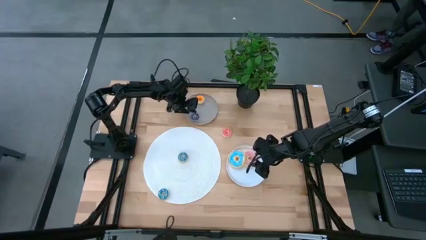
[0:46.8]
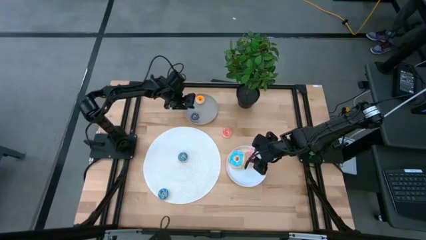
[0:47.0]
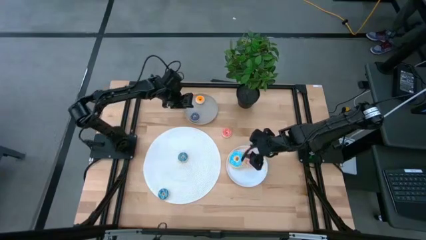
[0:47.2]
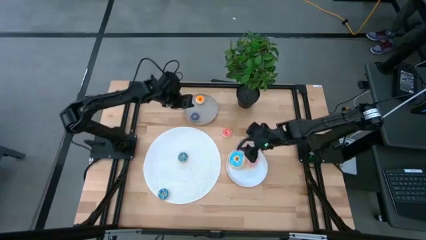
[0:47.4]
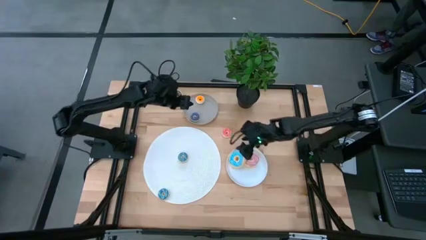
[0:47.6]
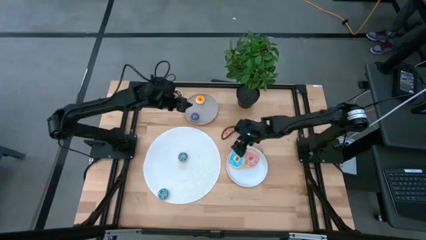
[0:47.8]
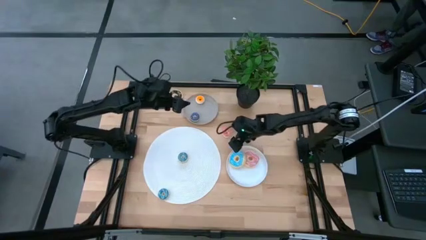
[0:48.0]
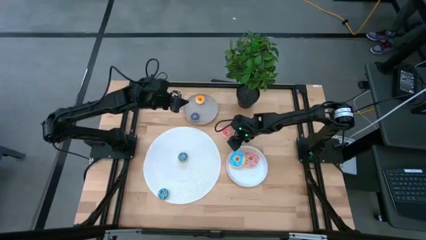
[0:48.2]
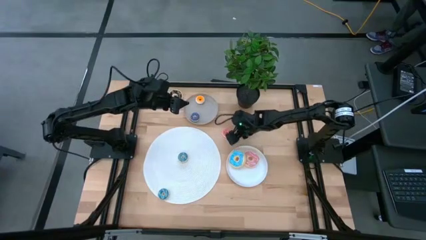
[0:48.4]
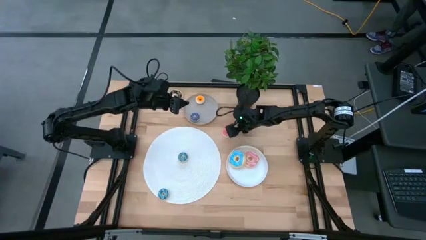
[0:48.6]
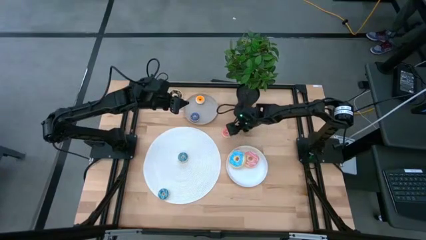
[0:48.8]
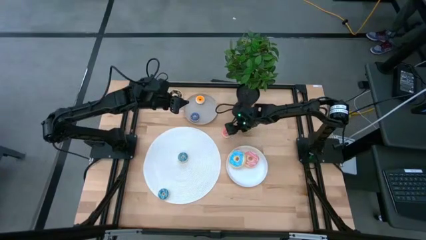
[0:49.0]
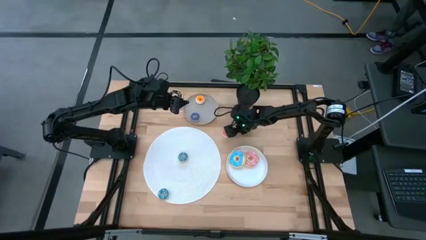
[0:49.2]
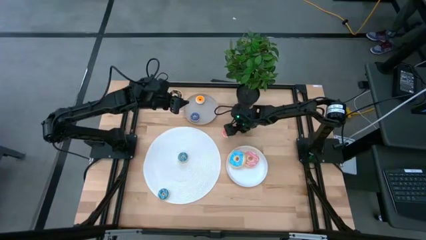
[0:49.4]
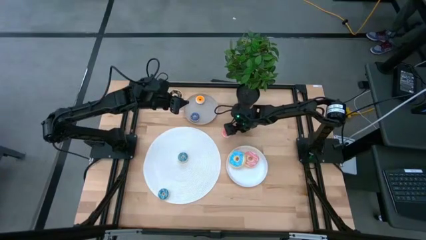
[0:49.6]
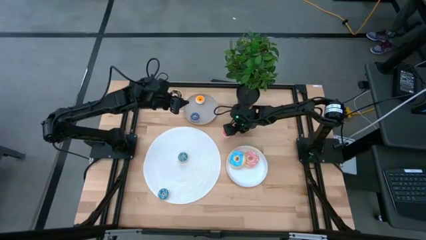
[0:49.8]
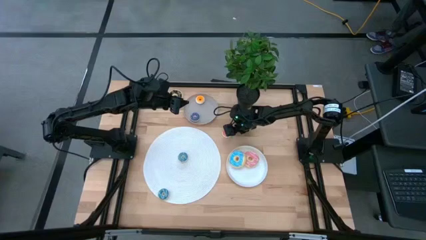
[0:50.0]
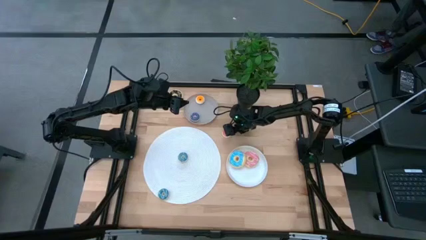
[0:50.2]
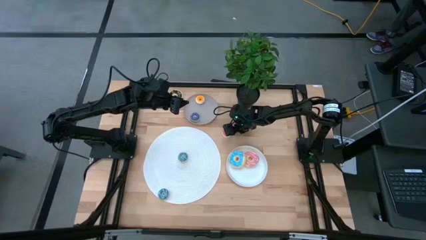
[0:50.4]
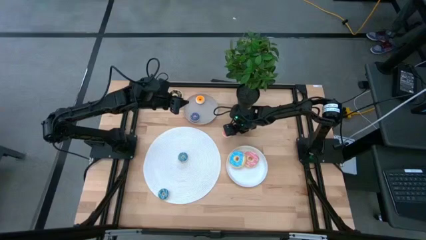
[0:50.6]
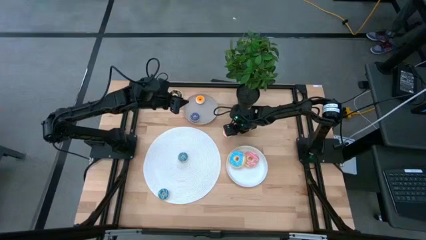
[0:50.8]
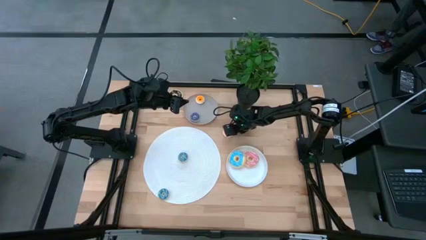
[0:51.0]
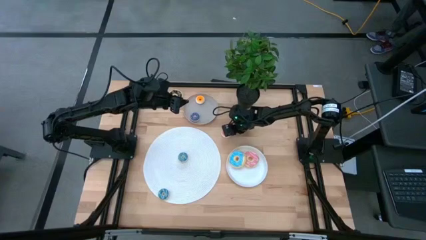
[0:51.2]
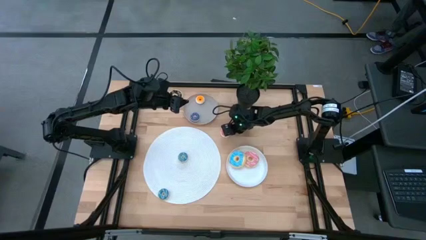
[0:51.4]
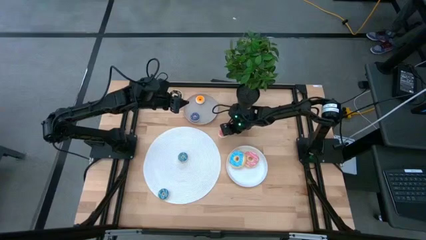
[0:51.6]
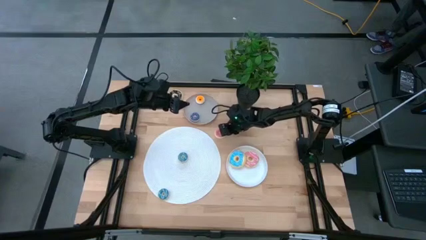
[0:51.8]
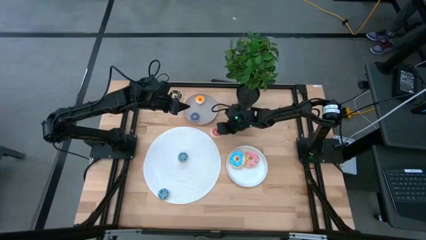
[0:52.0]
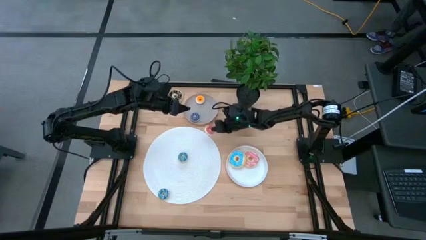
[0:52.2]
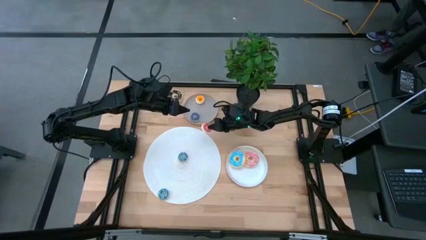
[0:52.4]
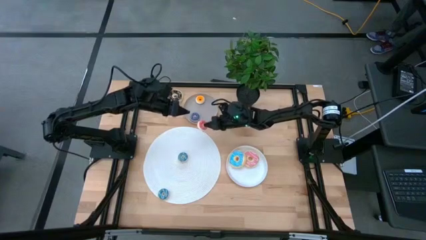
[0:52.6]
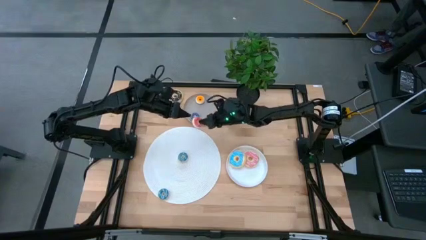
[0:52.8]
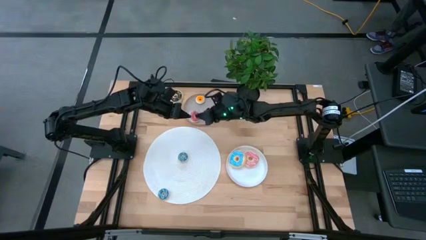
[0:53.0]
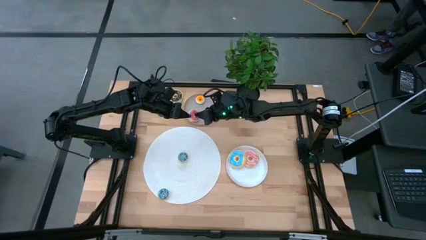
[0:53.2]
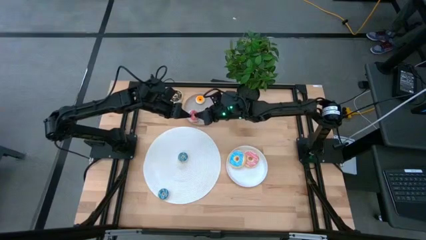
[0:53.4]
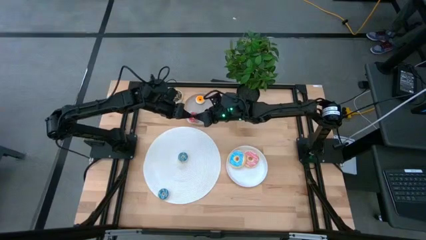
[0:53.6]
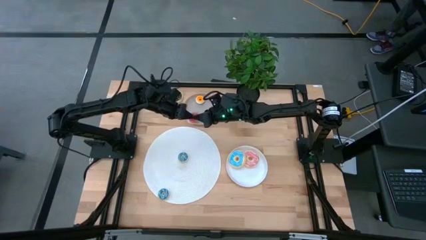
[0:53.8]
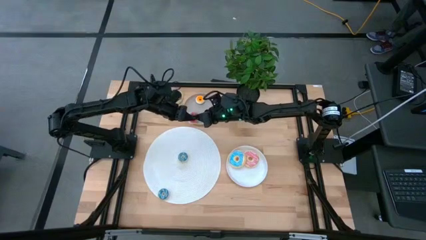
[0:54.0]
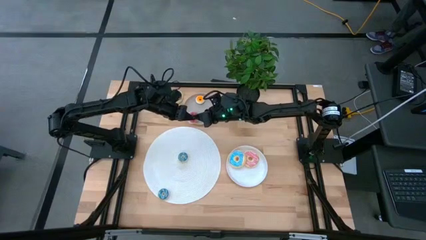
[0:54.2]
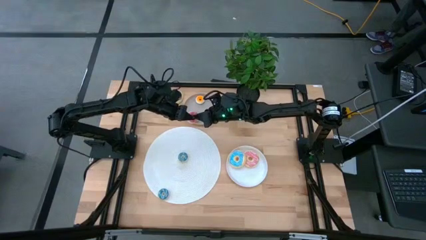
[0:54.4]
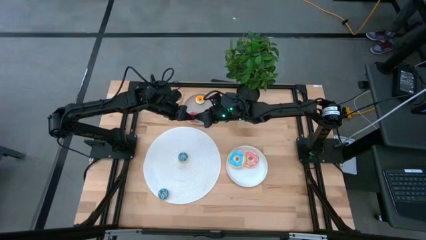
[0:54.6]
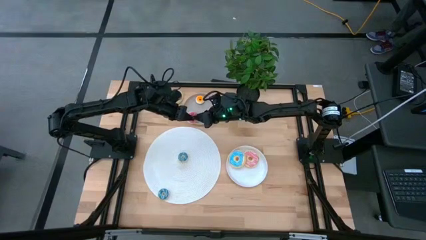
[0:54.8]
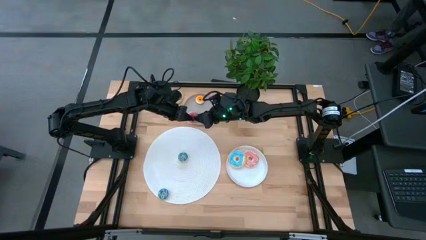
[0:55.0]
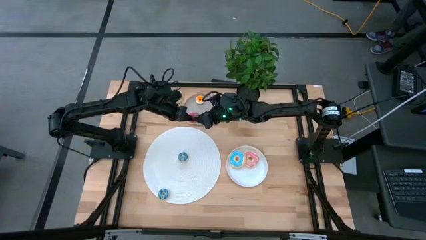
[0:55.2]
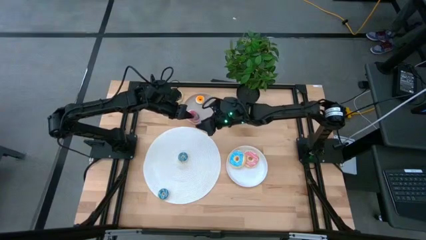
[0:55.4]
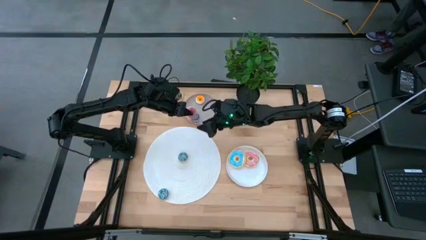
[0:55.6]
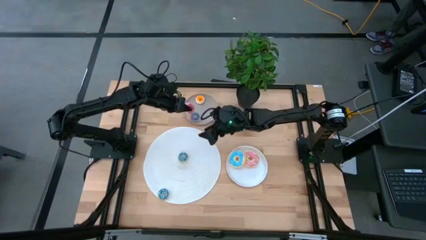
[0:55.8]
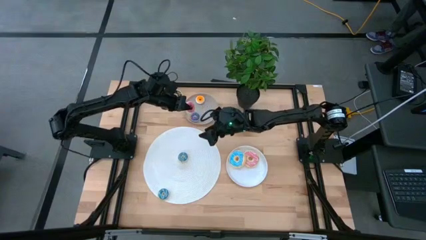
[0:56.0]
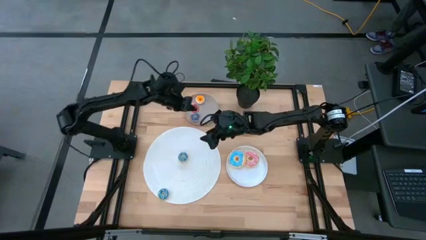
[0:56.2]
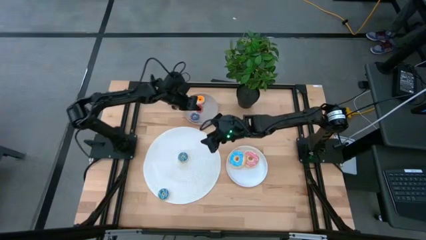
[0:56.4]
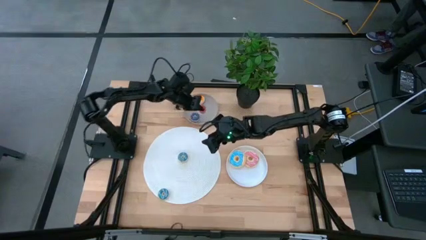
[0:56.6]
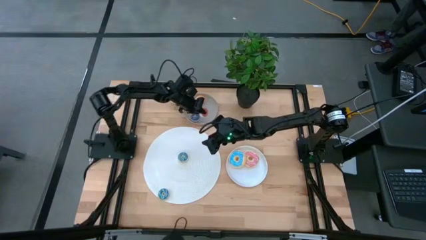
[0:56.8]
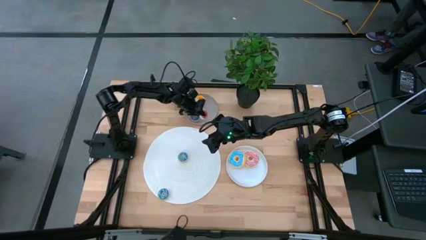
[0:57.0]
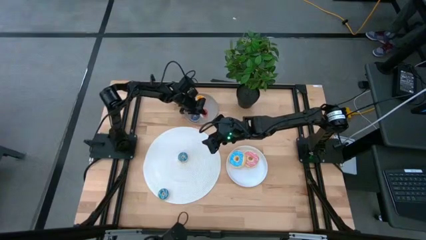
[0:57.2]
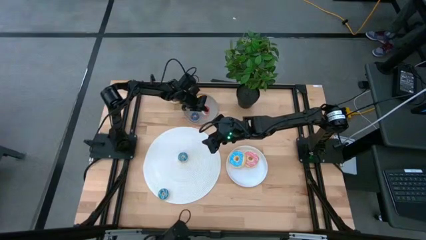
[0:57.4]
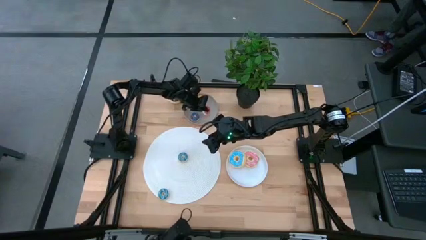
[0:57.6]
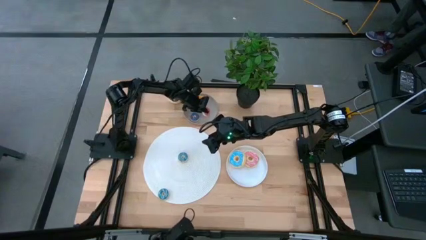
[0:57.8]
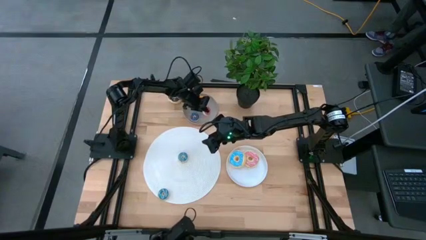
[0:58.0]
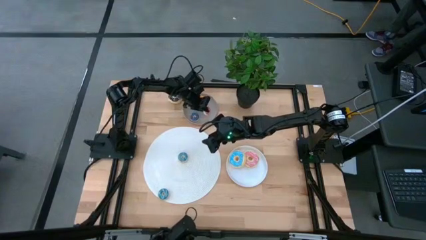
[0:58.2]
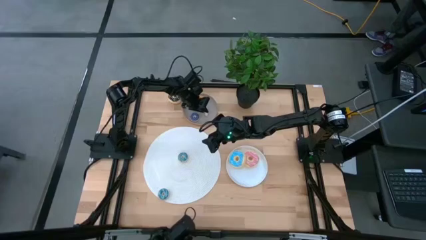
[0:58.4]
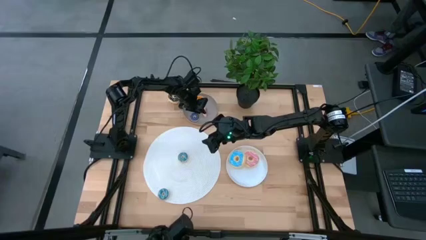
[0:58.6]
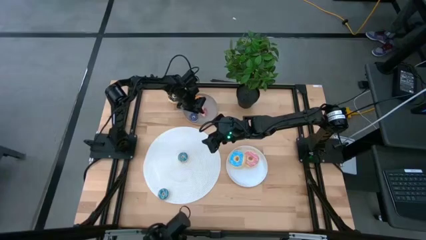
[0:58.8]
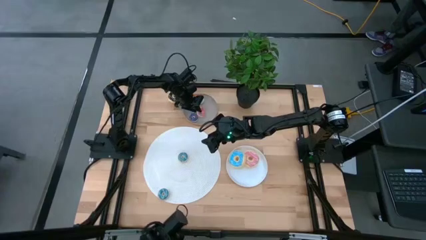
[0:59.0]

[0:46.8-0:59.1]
Task: Pick & Place donuts
Put the small pink donut on the brown plate

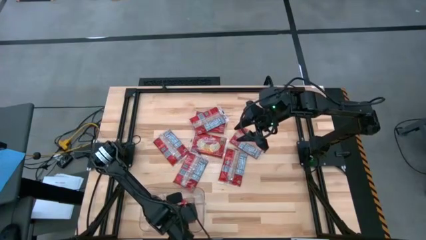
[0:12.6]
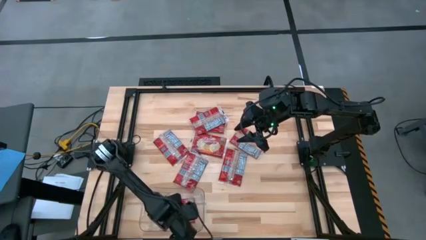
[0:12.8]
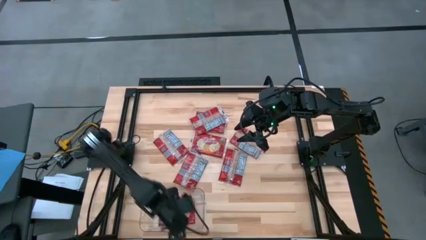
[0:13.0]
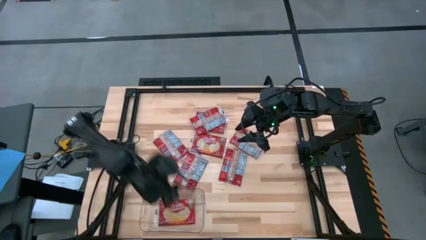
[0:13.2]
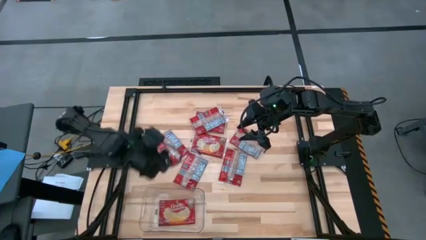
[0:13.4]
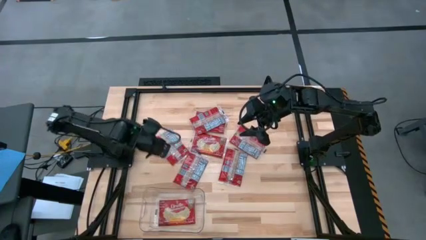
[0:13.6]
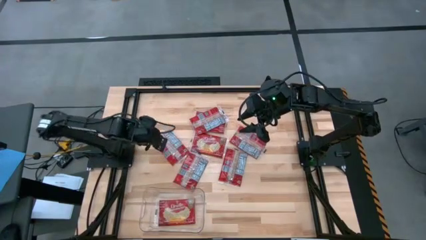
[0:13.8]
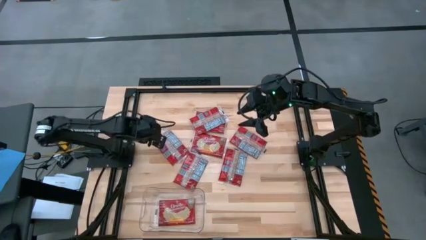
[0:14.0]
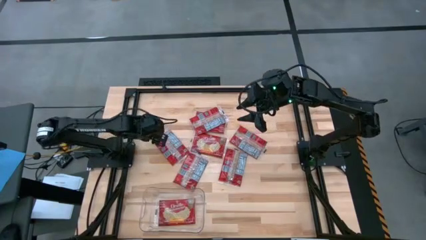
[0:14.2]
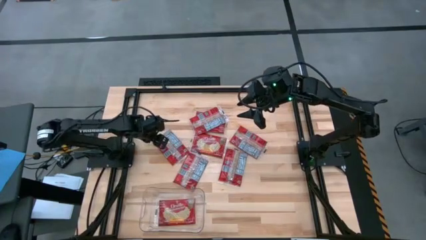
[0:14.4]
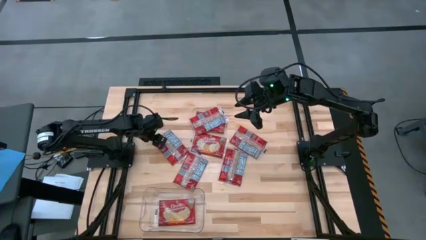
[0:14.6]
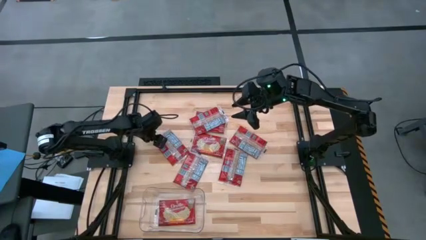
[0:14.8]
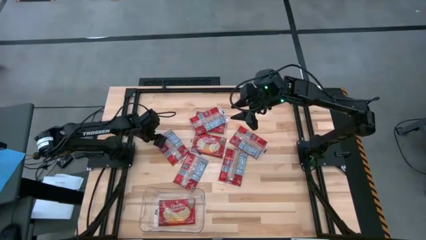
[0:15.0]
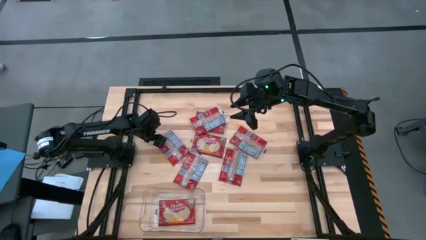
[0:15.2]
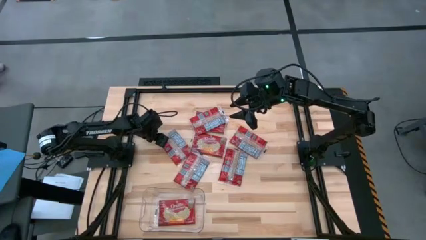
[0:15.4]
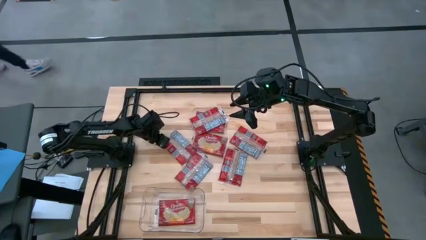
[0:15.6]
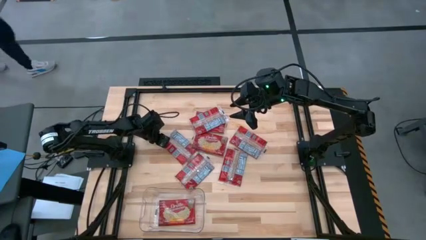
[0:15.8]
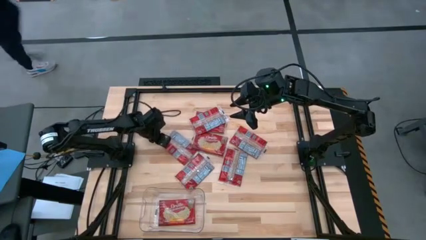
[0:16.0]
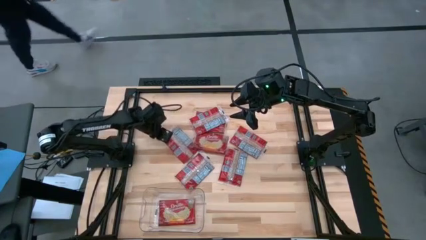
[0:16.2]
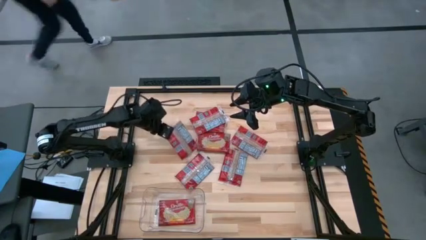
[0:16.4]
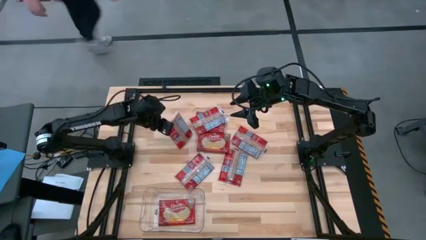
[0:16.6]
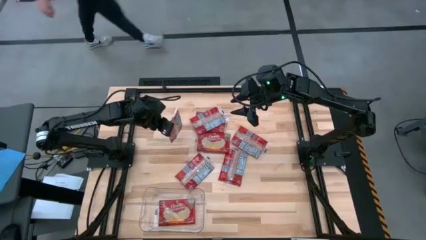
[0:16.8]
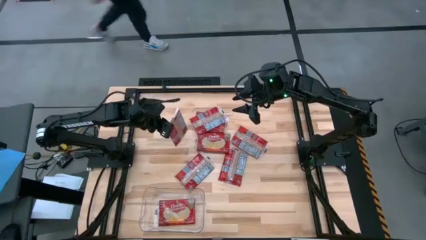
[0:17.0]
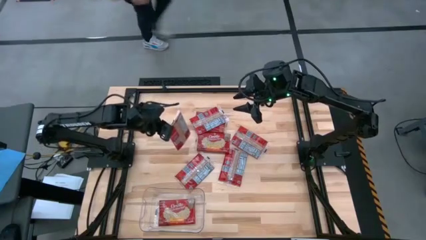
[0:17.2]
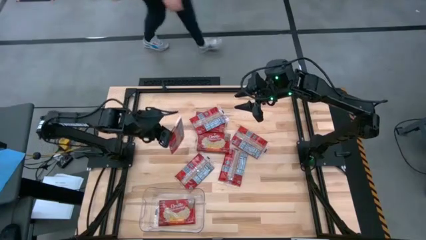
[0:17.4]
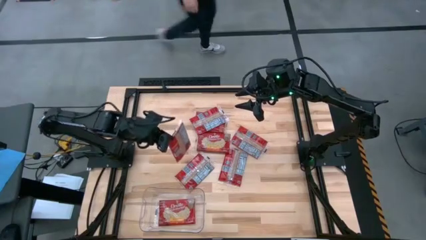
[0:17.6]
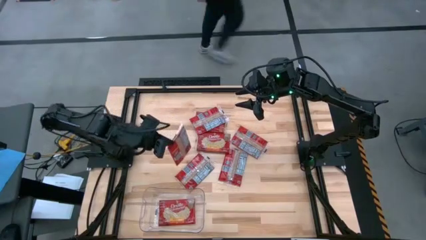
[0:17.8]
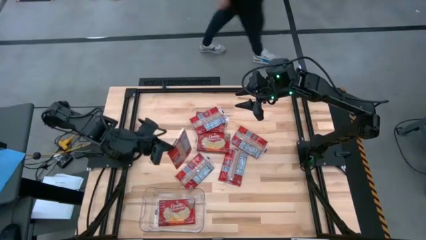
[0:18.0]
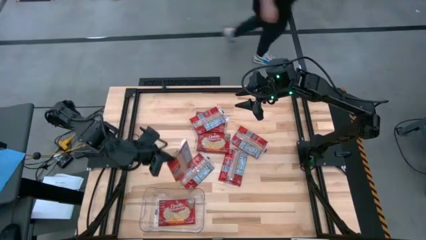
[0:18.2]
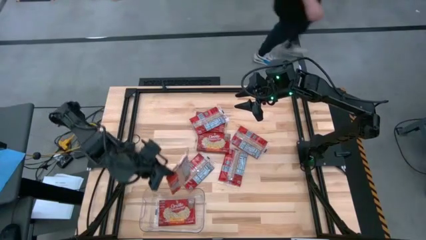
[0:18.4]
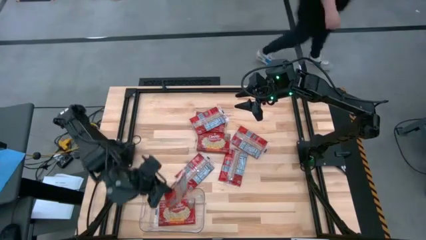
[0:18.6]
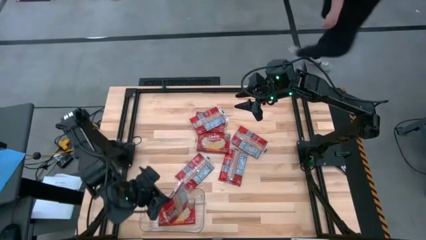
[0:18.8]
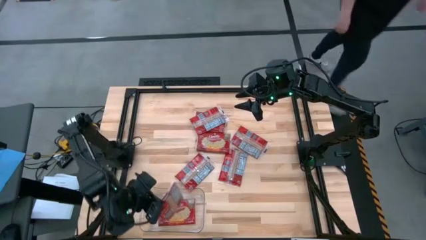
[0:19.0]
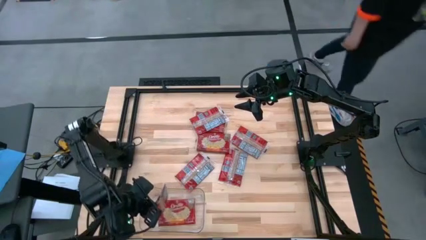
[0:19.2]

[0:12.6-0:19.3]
Task: Sort popcorn bags into baskets
Put the red popcorn bag into the transparent bin
